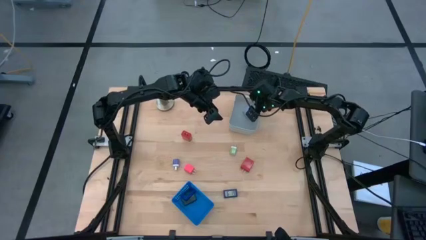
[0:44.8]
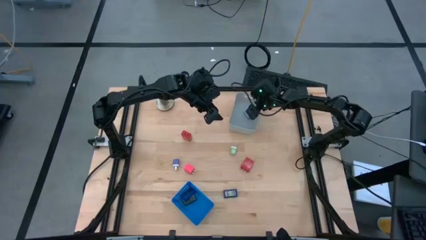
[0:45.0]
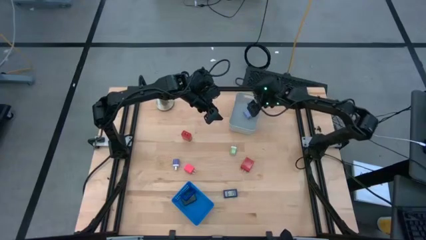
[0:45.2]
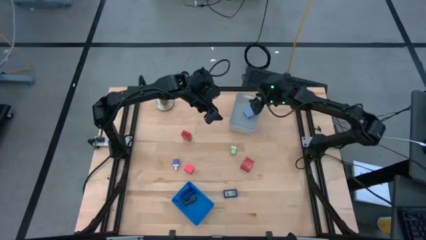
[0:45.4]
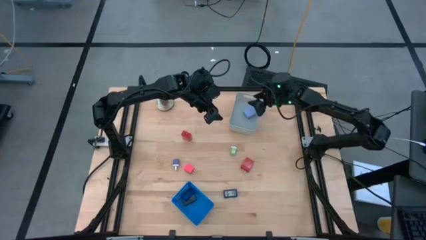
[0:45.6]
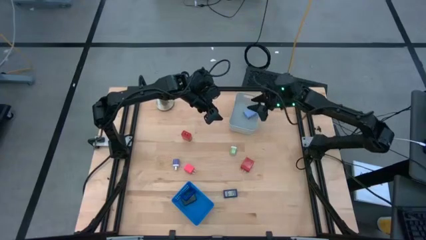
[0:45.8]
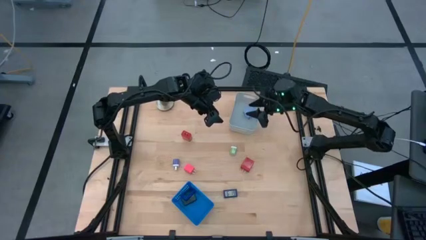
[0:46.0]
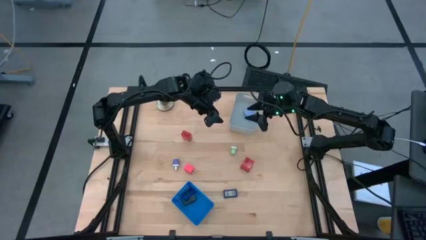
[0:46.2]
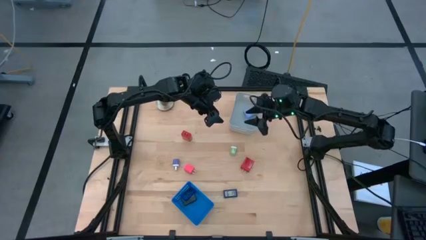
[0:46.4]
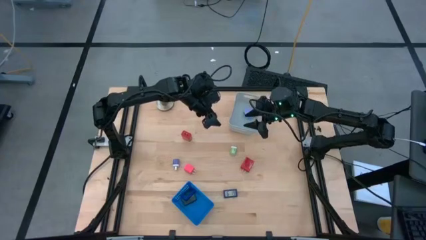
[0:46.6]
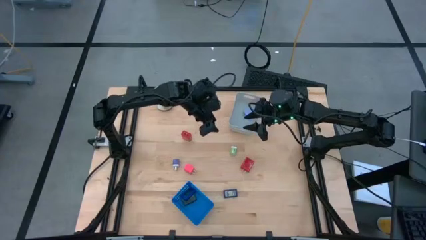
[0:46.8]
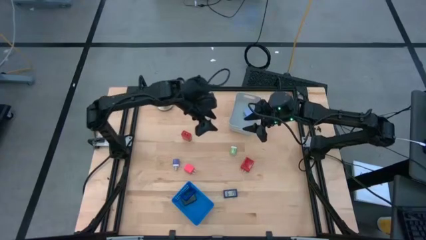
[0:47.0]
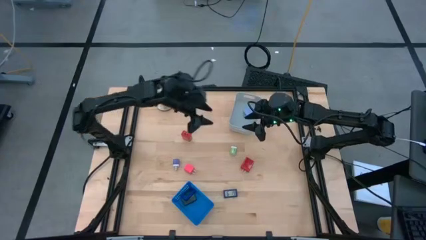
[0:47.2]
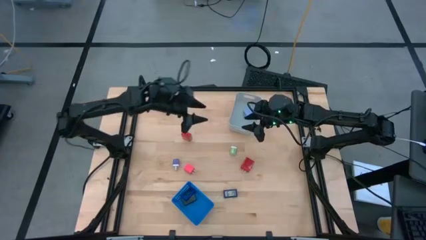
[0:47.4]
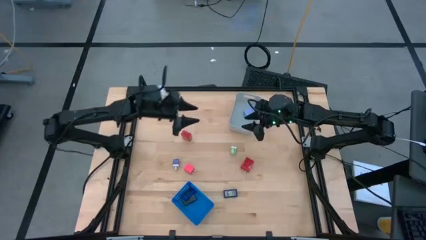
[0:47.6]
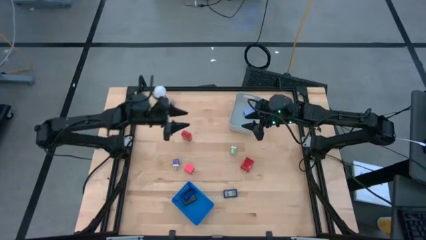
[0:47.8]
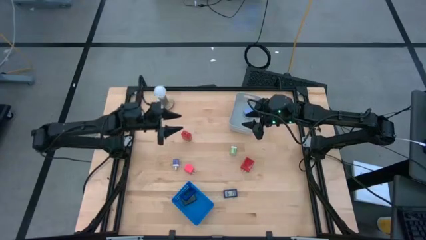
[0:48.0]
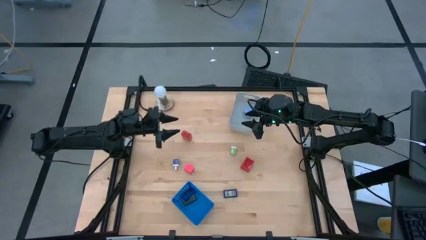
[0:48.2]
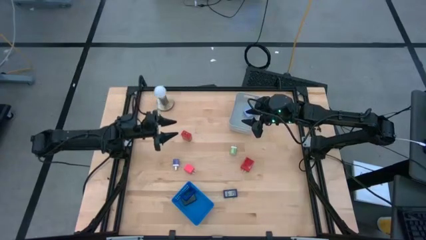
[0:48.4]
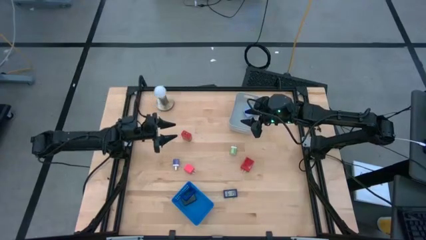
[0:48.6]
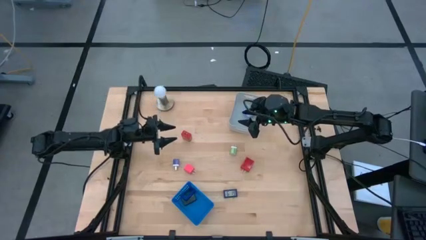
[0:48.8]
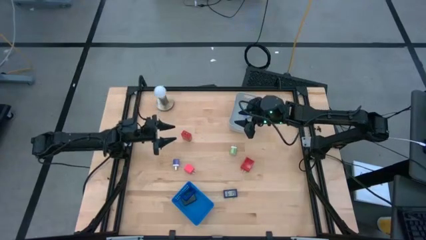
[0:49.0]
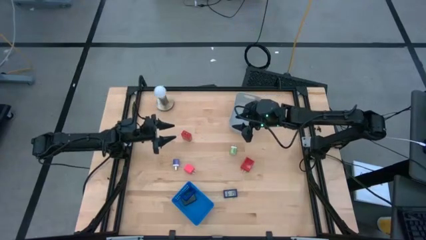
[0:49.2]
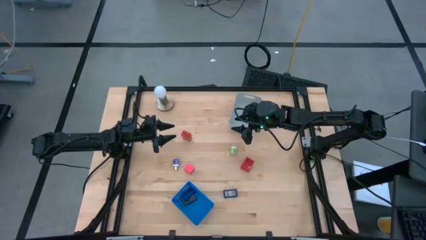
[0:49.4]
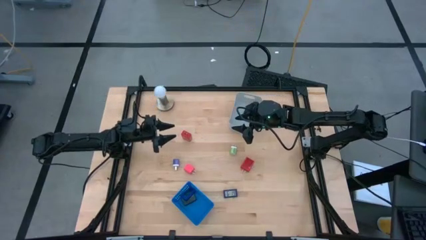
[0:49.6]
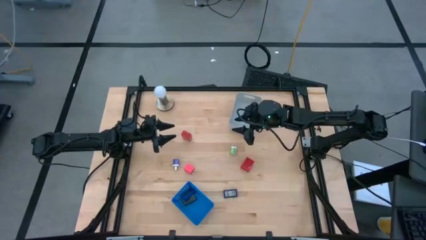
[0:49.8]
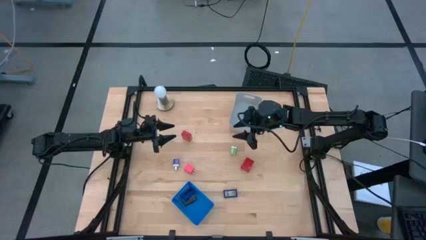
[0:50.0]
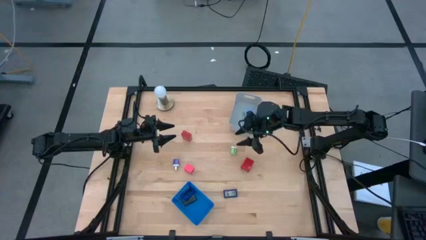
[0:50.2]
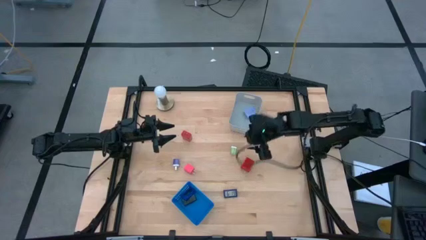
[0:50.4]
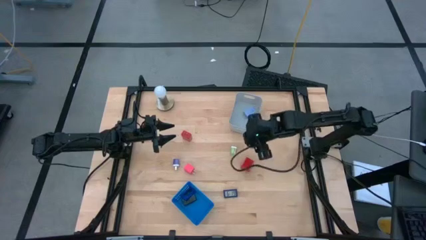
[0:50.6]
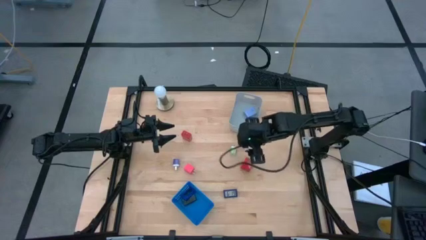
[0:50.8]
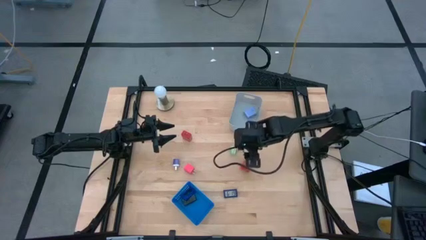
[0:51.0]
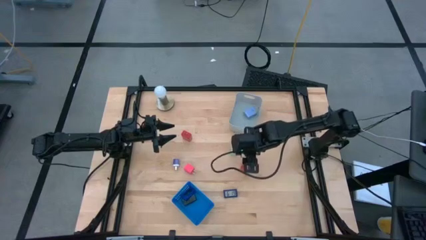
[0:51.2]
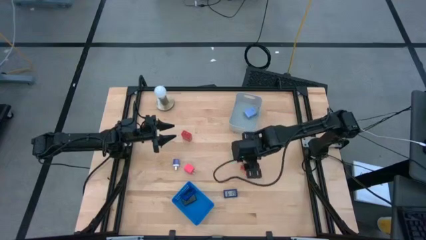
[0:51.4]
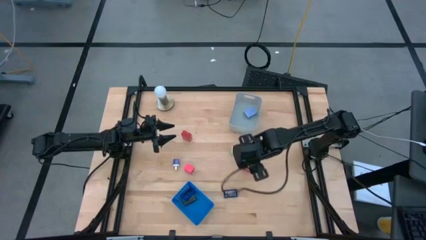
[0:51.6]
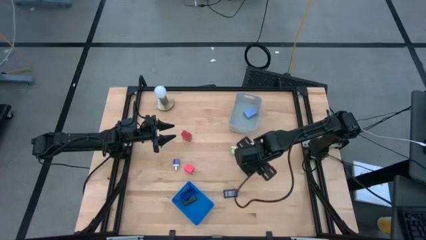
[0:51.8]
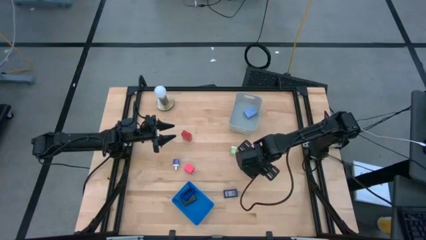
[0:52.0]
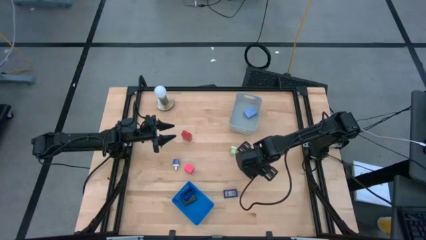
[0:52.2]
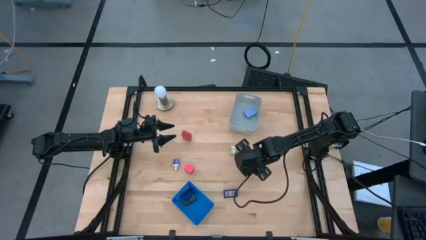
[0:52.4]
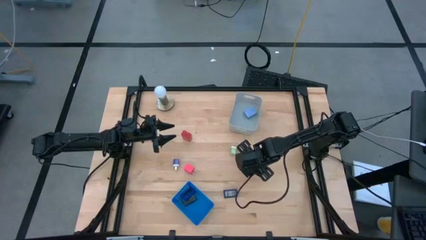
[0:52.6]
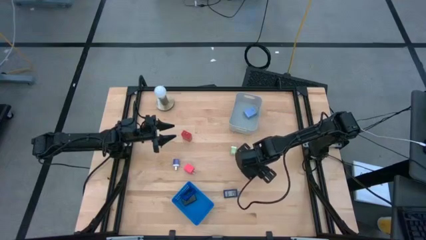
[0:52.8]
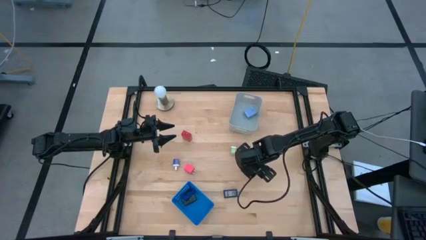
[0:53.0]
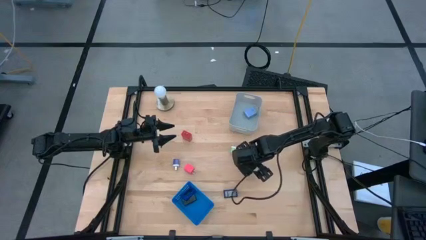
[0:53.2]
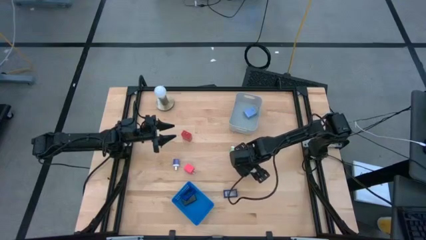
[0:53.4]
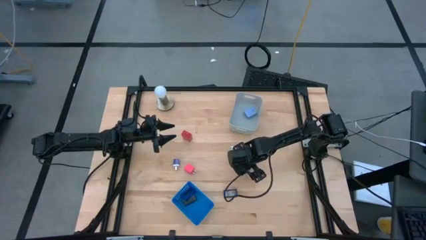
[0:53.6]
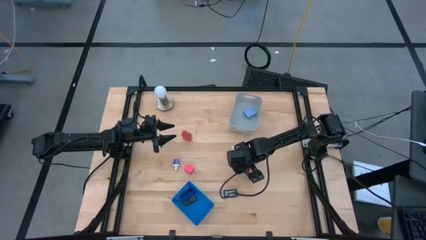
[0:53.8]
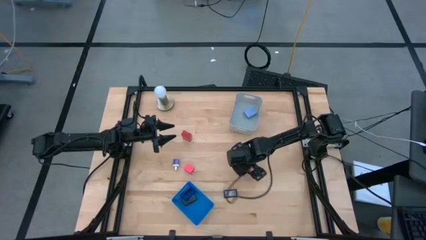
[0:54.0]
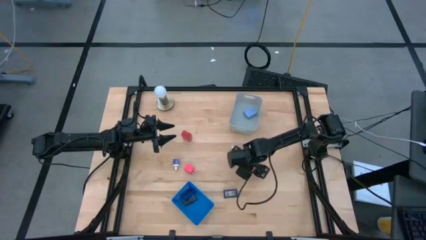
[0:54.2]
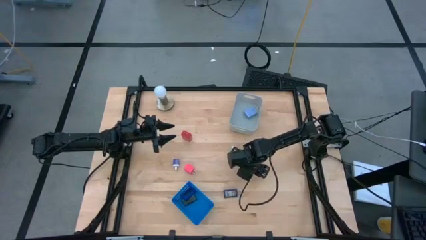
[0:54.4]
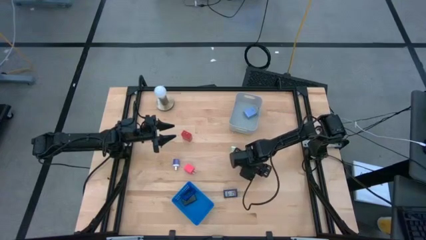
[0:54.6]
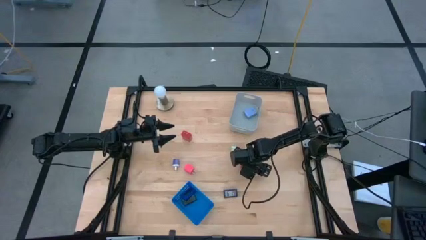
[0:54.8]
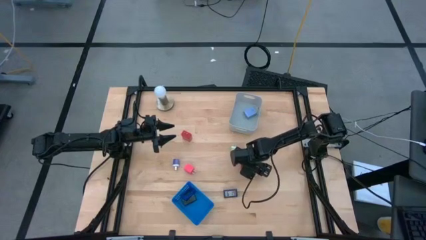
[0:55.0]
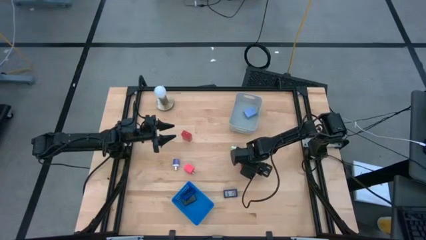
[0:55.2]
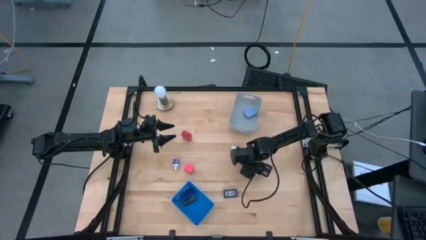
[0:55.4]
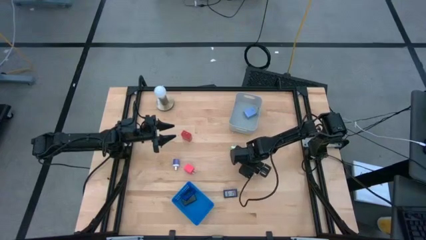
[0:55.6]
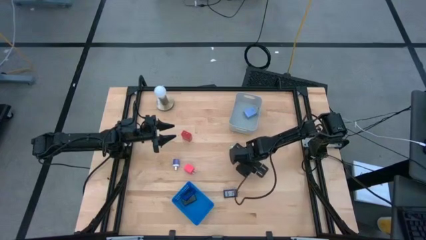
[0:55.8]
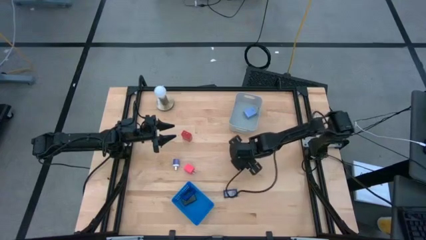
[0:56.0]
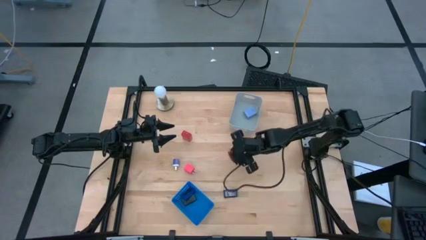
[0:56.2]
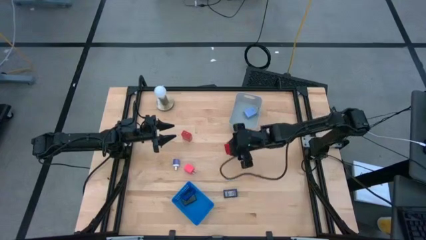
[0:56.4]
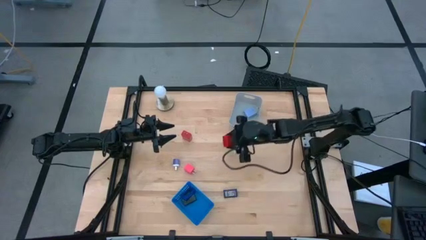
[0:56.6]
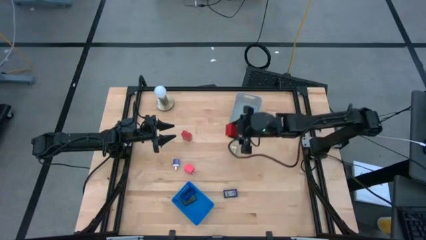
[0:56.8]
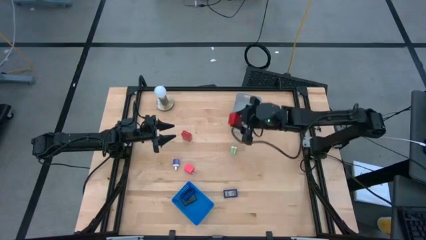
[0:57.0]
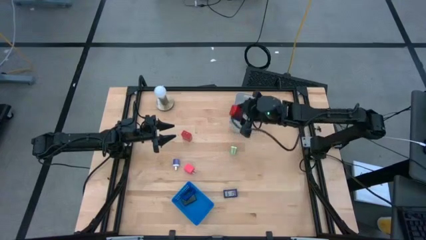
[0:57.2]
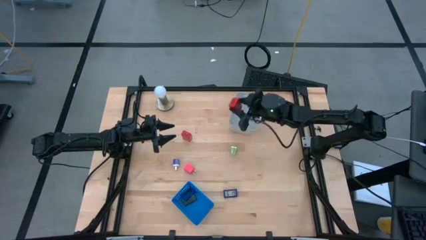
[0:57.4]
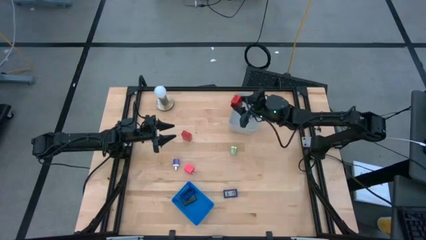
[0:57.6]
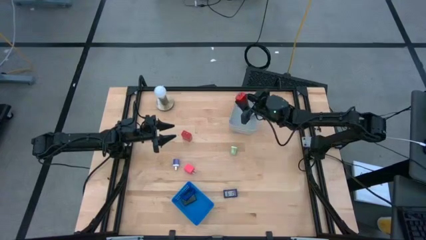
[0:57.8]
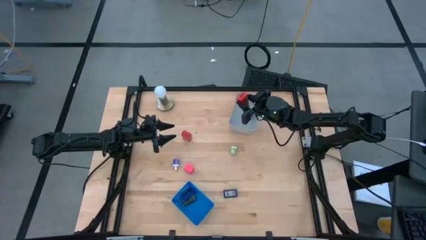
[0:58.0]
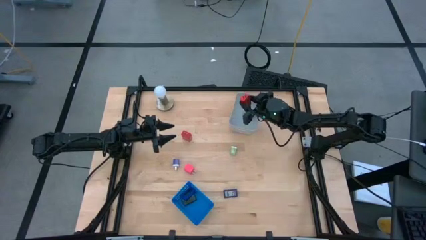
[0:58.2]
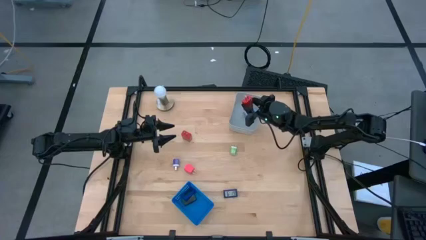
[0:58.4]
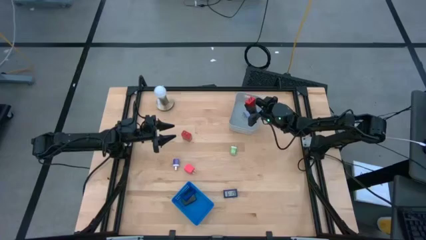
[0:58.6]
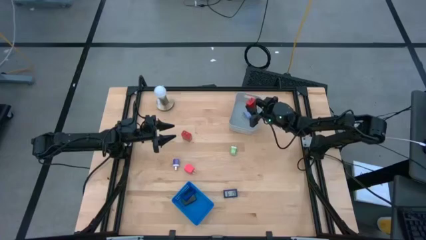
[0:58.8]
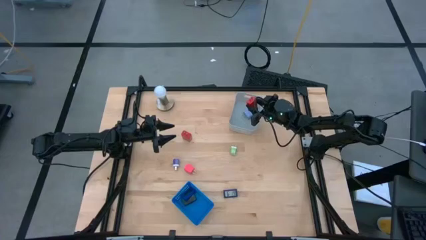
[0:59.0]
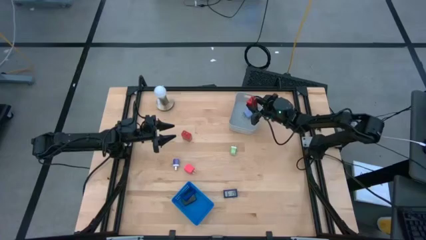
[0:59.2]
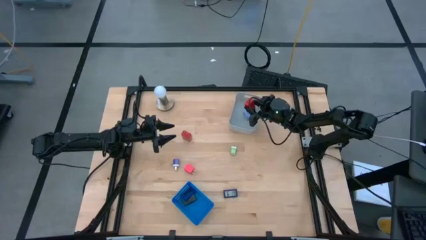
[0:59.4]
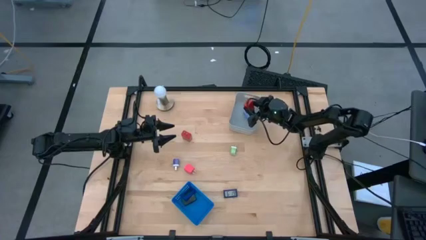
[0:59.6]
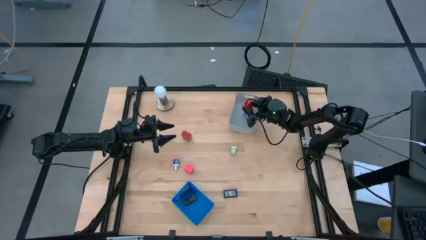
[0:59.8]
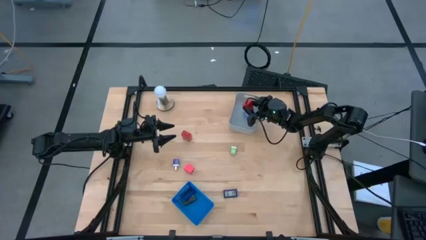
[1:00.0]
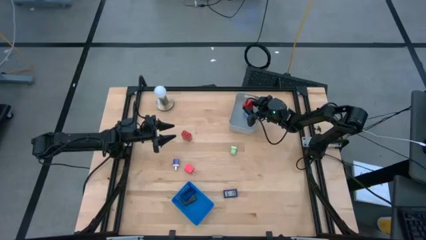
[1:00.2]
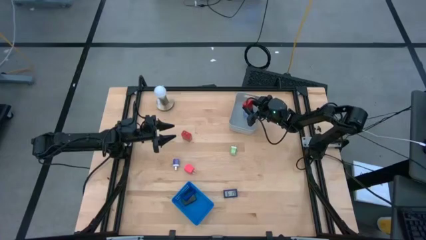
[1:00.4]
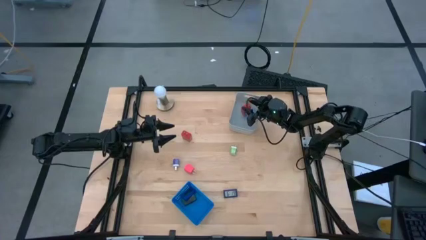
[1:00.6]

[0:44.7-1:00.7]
Task: Pick & Place Office items
Put the bottom red charger adapter into the gray bin

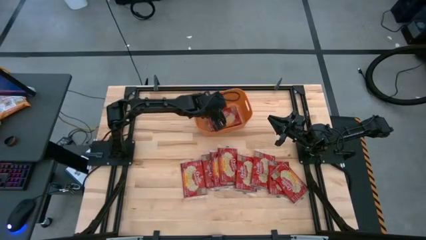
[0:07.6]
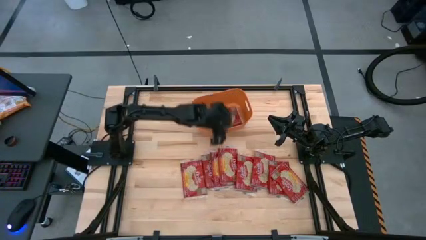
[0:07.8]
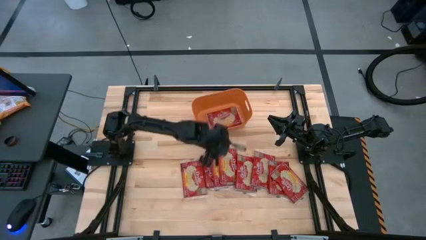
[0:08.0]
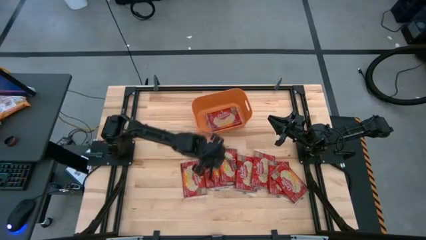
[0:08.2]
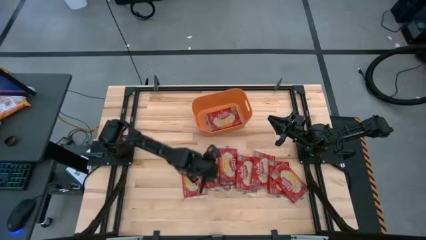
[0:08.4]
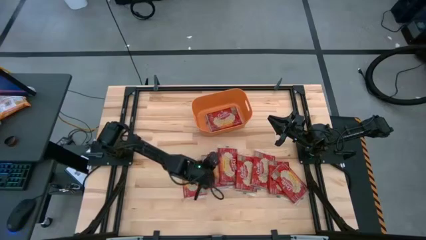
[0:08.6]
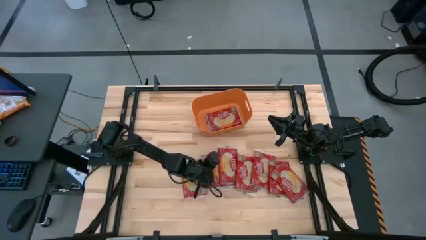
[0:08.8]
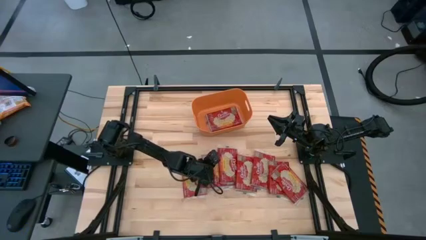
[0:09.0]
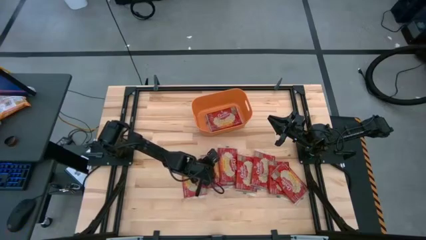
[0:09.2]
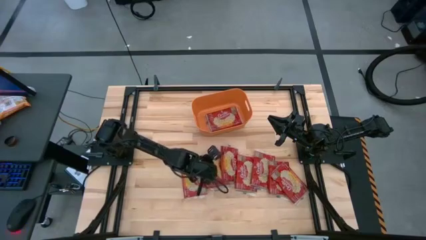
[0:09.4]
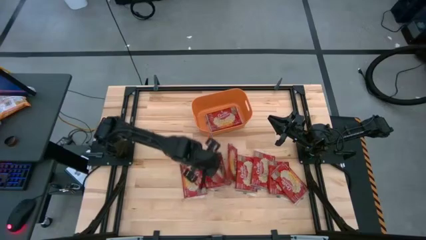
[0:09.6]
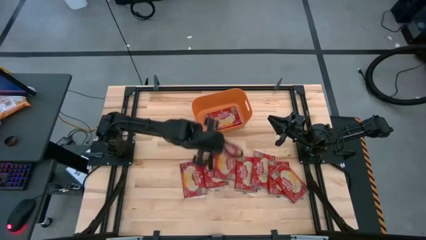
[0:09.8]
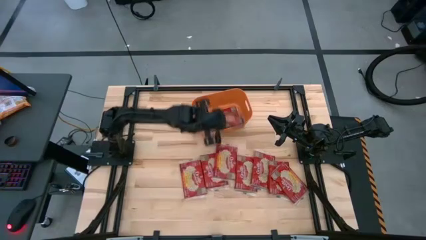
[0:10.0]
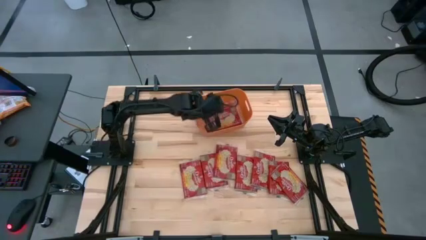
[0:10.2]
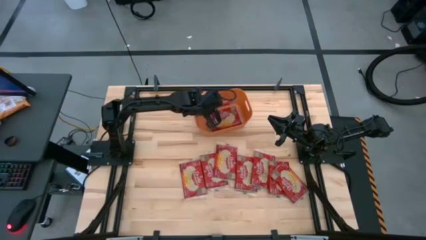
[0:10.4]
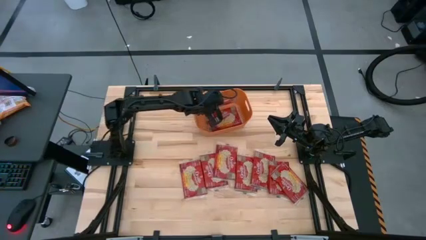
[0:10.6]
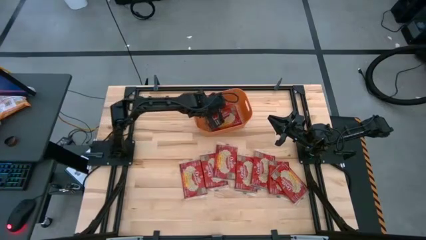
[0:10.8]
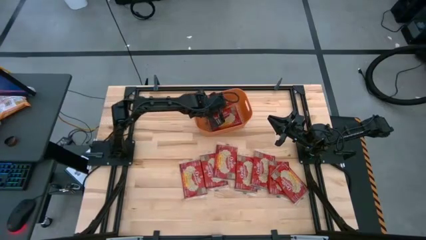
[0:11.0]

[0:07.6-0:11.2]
Task: Sort popcorn bags into baskets
Put the red popcorn bag into the orange bin
